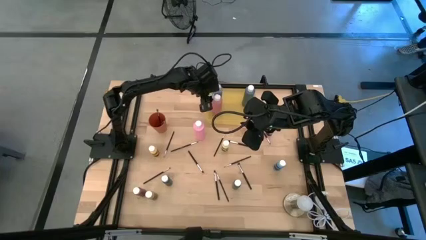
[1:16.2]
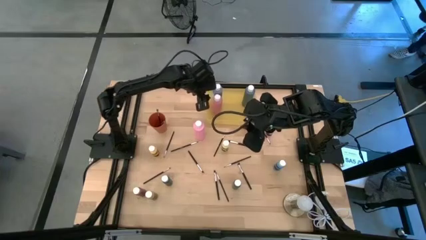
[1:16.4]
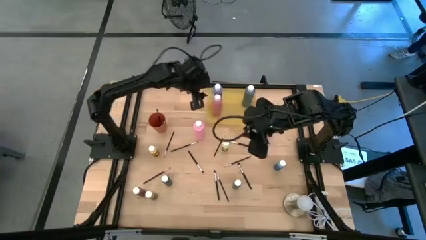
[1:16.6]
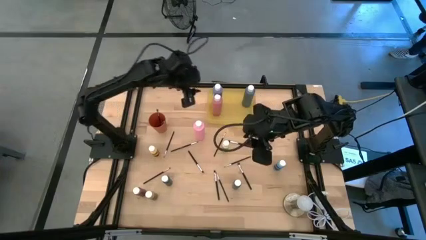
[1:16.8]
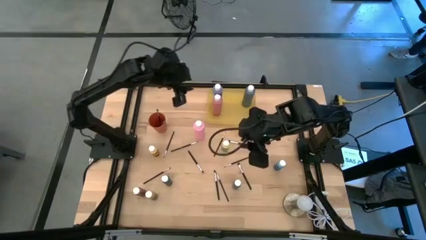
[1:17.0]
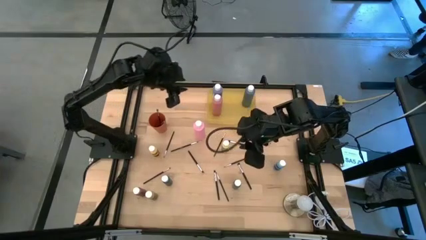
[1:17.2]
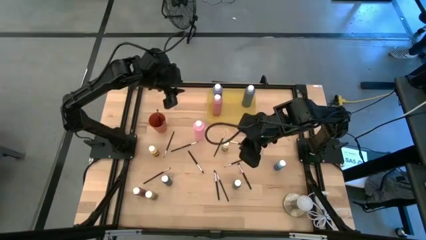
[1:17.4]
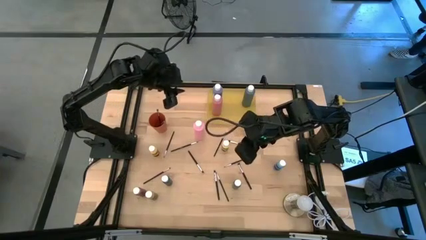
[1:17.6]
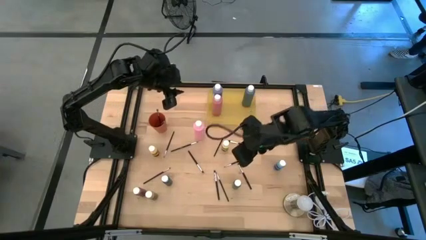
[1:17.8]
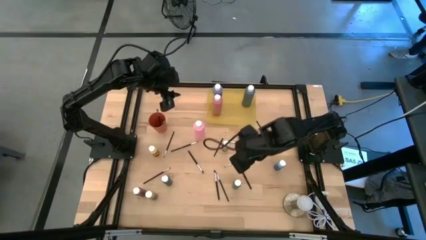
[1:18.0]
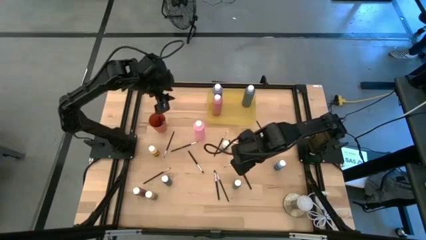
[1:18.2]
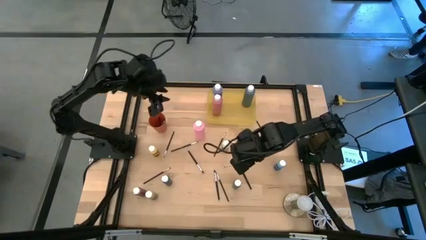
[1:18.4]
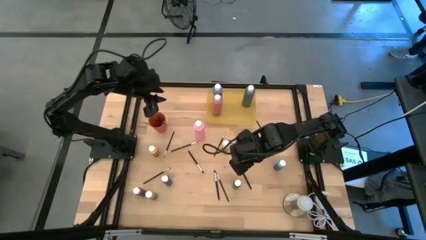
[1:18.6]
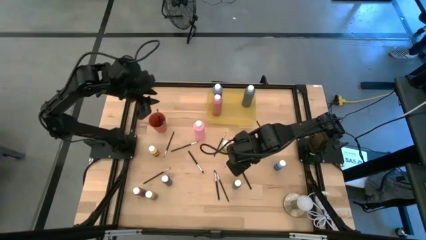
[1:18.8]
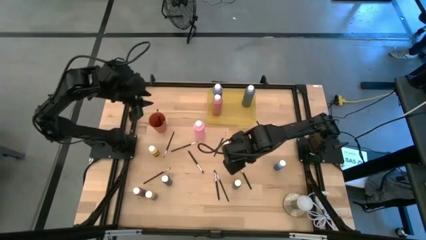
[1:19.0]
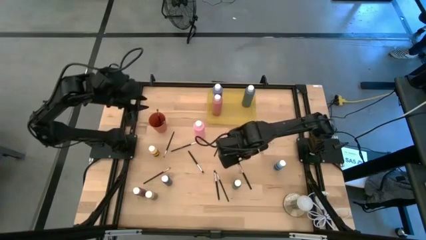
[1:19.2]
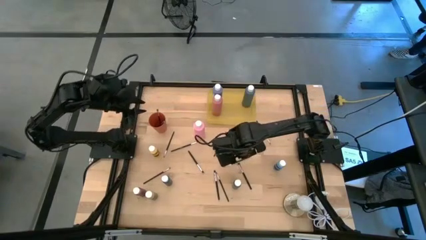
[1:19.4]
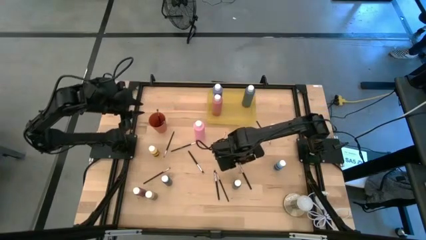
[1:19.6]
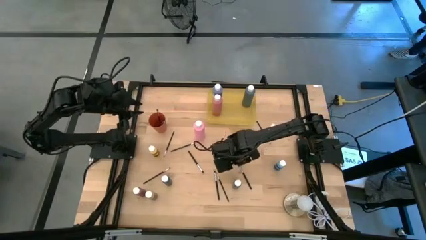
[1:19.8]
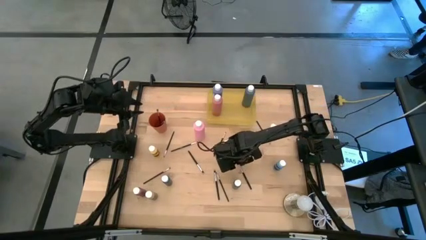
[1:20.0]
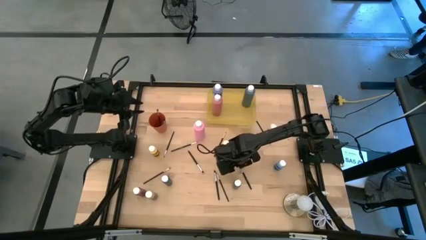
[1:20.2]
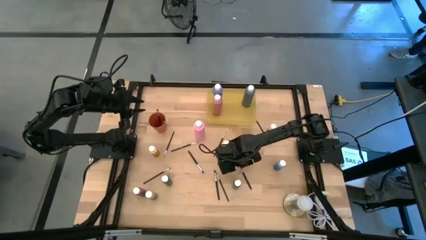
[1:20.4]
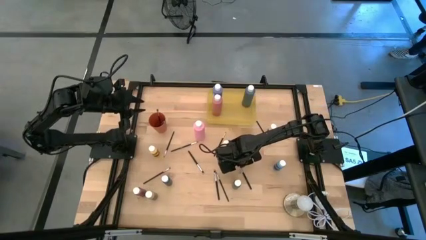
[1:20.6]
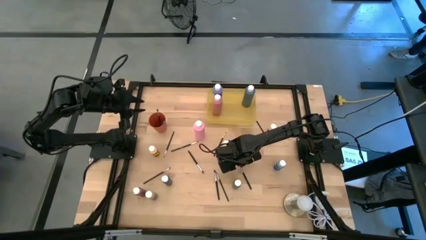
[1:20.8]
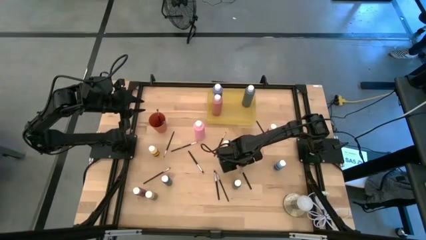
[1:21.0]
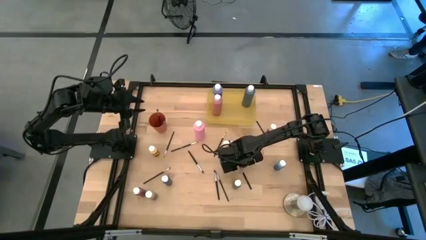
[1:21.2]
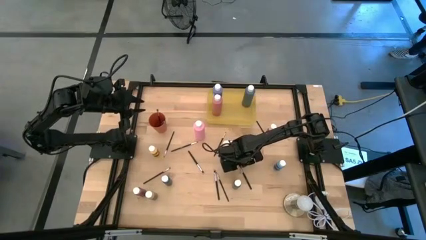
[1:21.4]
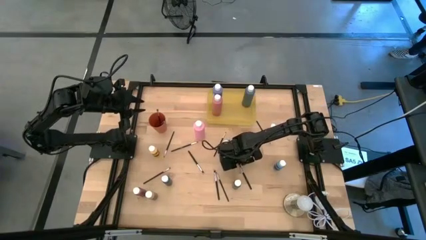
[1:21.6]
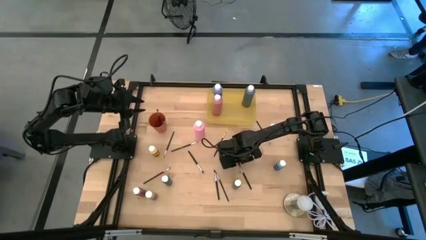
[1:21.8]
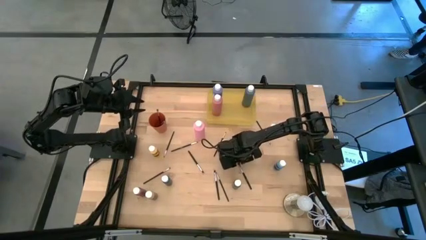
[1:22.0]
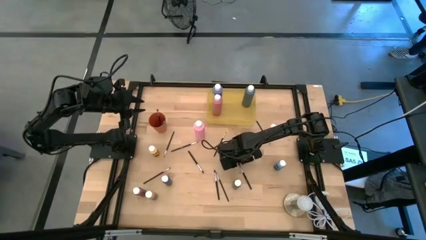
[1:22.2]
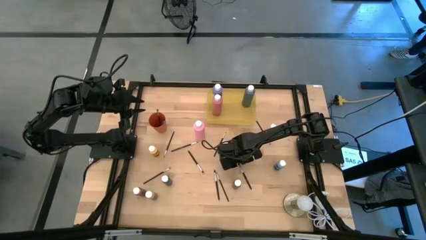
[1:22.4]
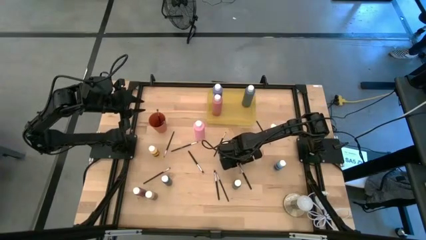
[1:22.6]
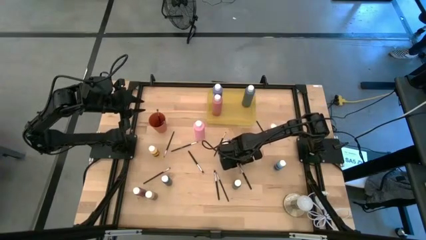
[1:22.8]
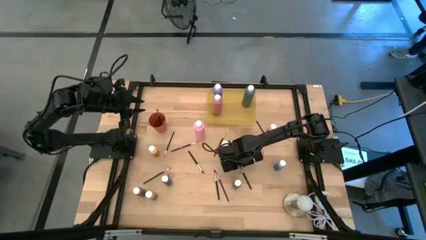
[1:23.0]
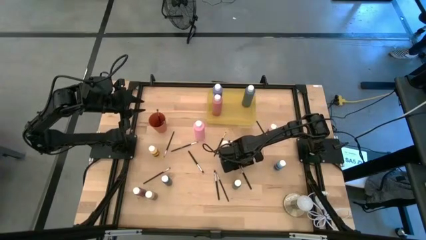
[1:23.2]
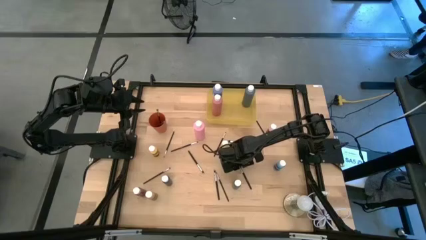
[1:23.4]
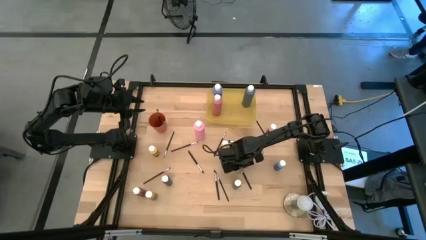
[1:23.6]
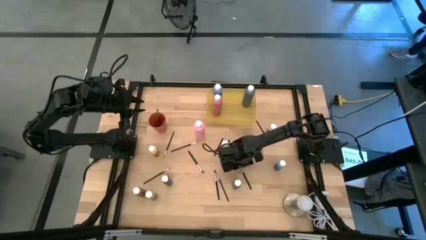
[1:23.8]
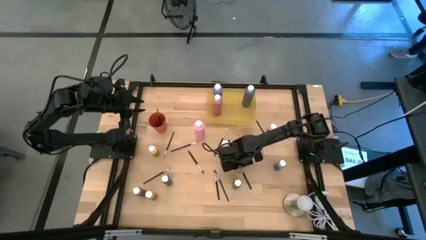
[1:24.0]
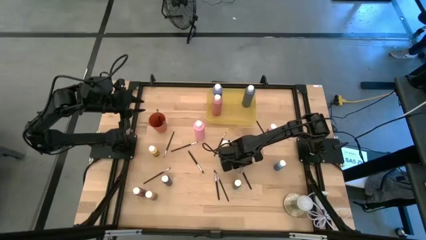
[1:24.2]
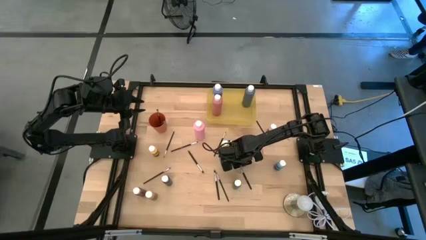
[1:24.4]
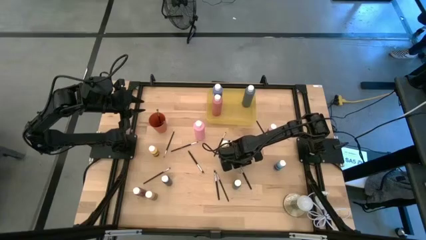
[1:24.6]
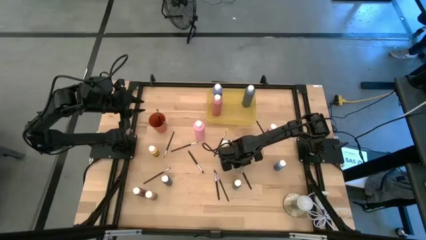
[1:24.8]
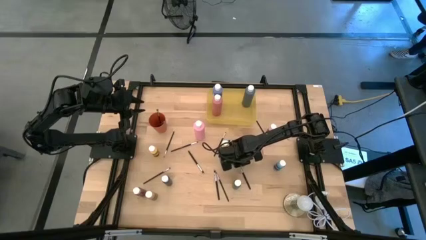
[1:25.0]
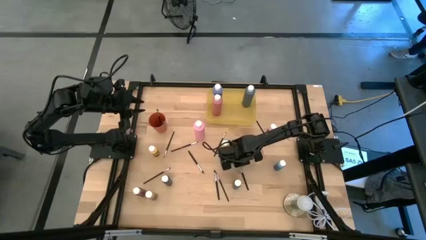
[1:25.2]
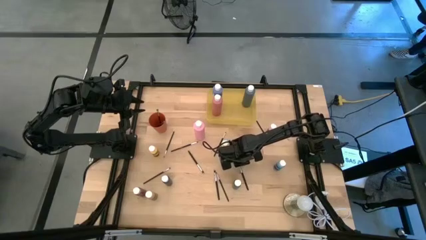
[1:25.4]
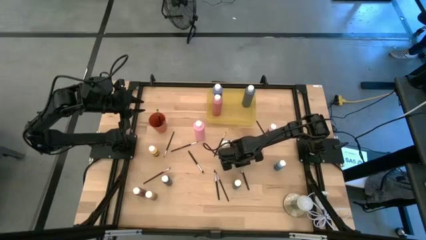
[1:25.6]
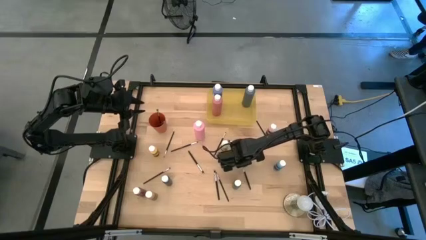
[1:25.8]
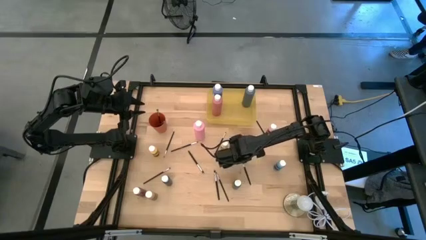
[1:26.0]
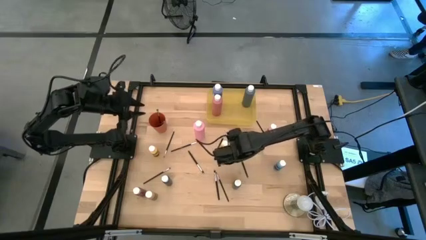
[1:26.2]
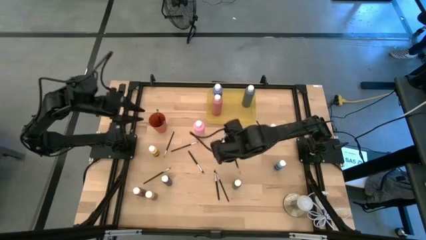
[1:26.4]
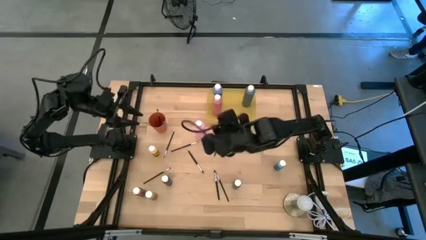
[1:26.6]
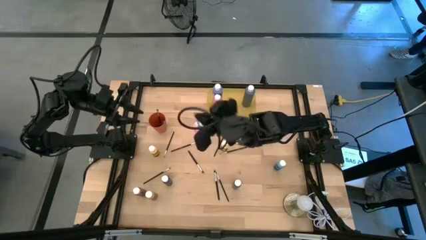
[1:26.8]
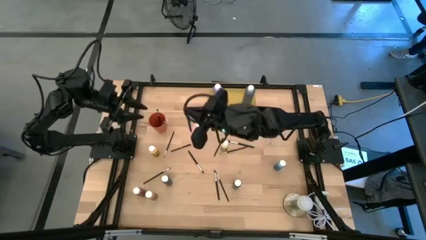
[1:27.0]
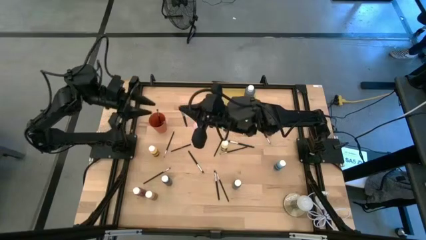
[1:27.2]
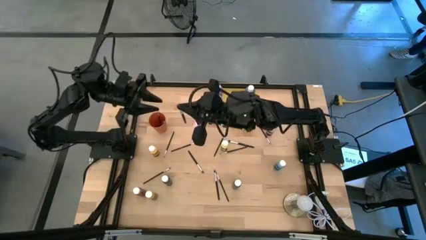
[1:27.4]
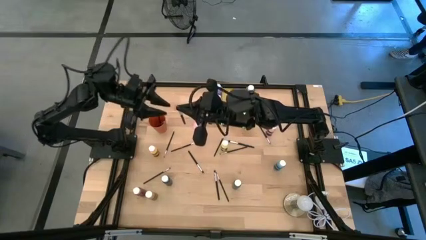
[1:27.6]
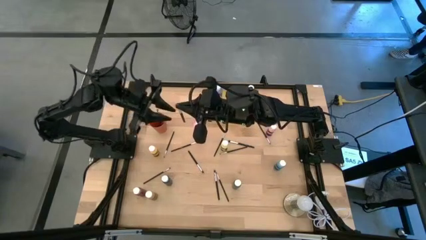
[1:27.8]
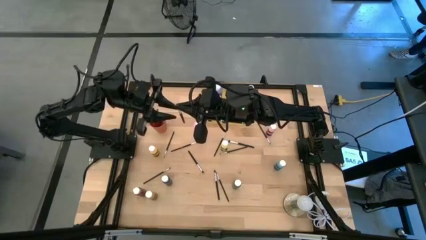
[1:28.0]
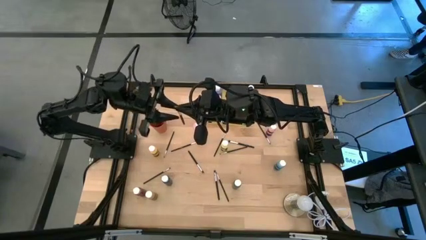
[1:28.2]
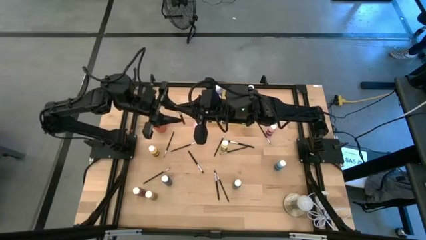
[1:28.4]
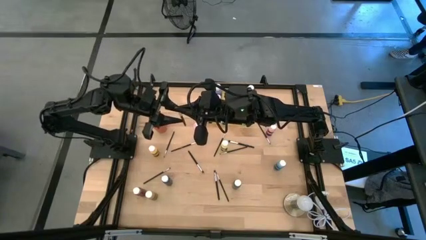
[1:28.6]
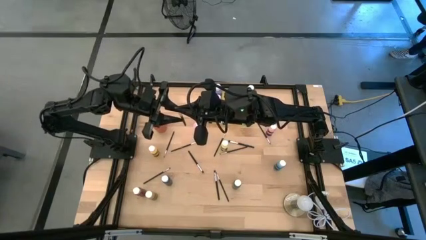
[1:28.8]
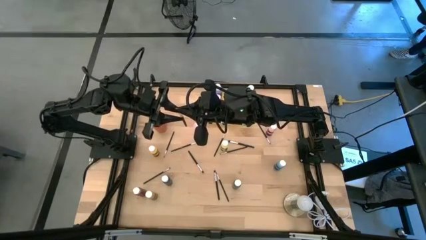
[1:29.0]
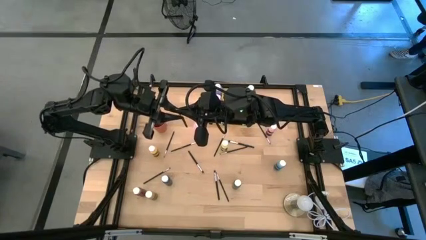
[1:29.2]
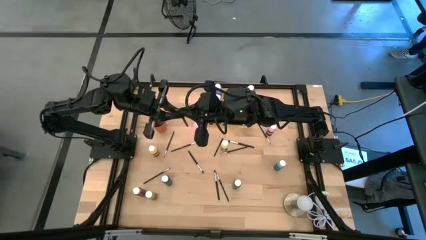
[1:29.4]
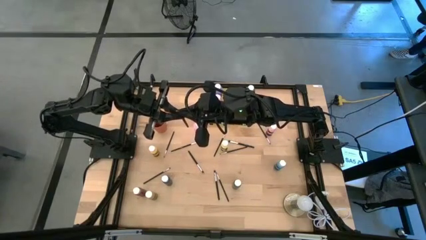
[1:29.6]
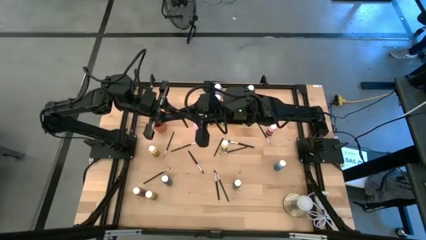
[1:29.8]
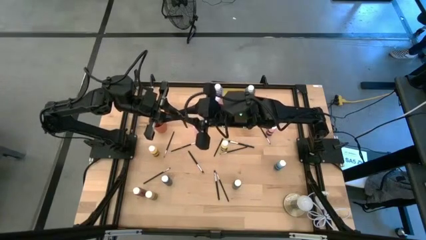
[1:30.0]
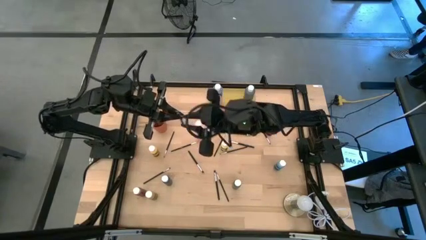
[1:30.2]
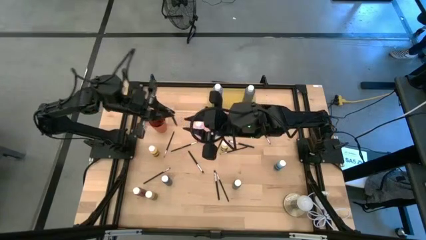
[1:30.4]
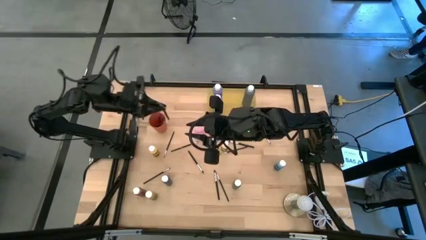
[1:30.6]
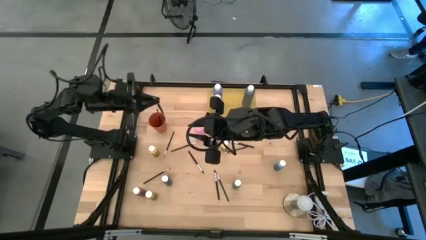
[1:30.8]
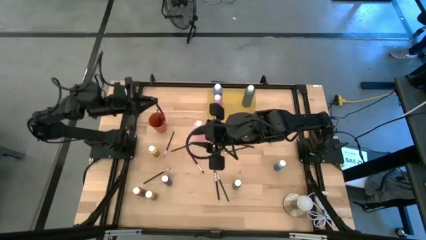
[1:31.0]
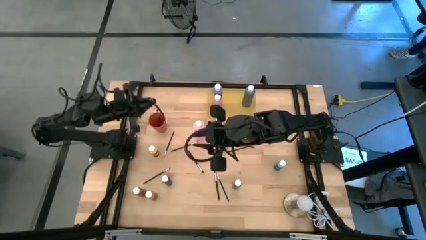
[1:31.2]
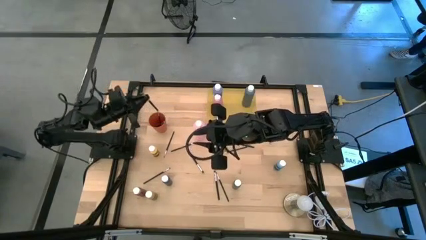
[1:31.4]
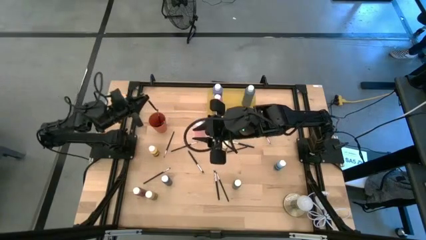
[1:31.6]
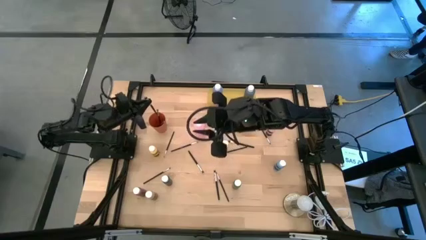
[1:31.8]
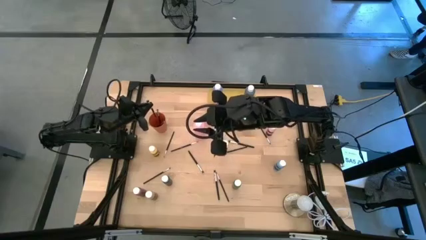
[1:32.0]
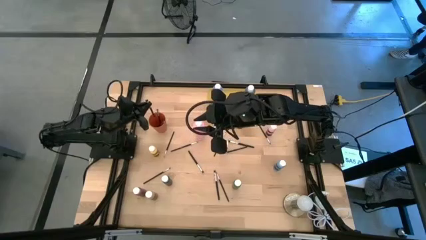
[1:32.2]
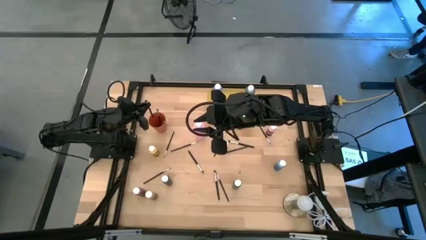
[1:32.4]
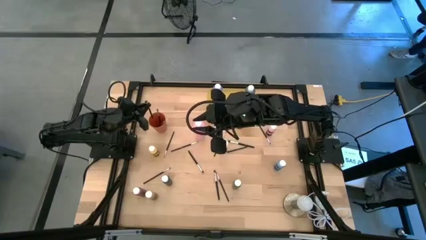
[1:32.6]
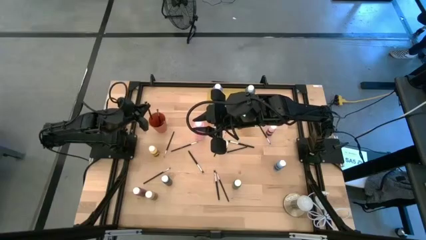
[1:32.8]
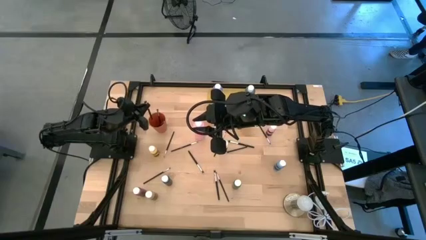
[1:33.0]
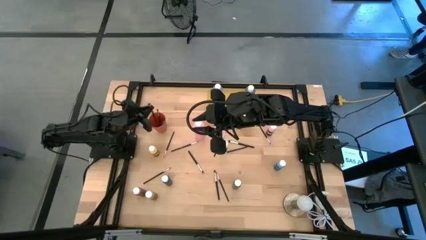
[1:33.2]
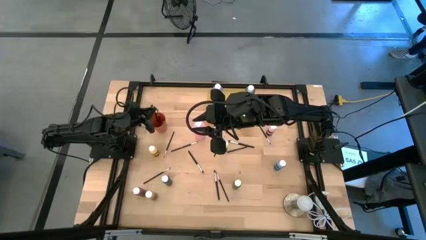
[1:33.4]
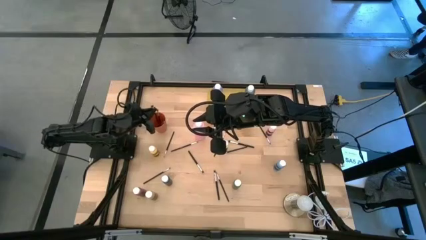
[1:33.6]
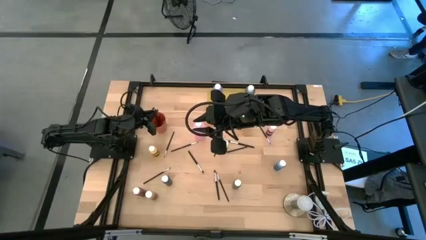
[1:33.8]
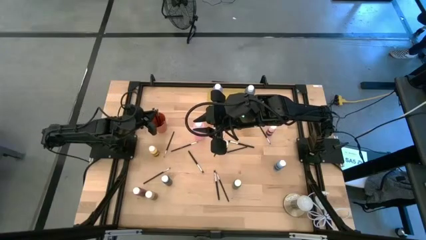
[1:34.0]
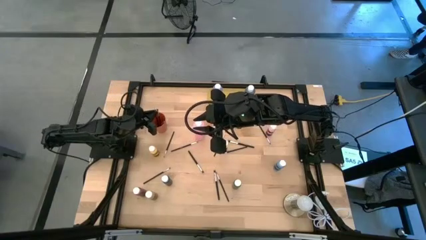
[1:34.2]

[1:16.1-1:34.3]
Task: Pick & Place Paint Supplies
Put the silver paint brush into the orange cup
